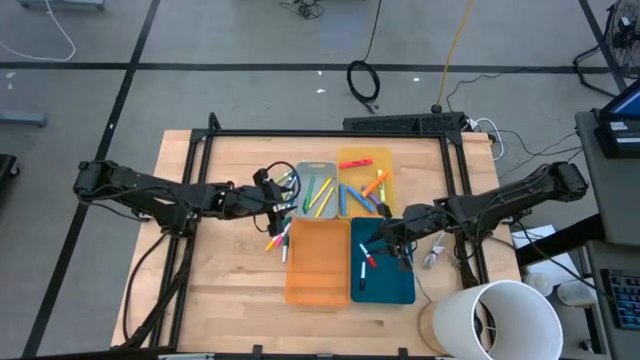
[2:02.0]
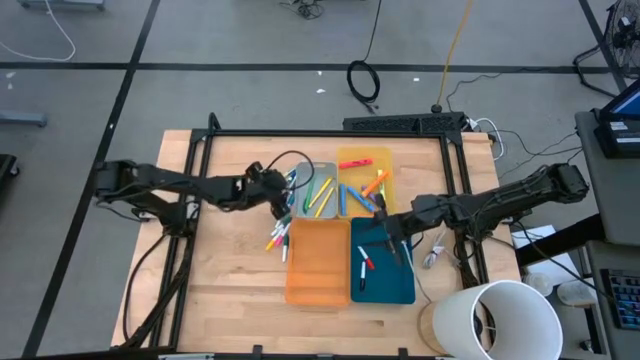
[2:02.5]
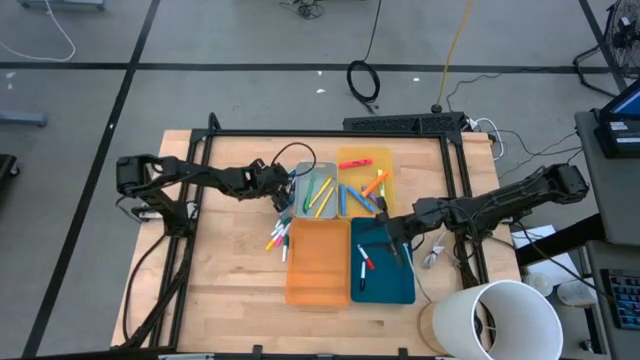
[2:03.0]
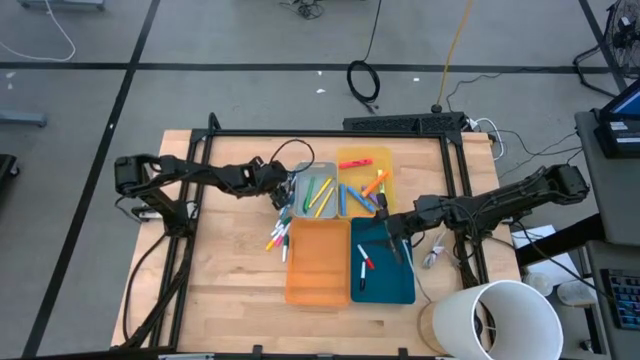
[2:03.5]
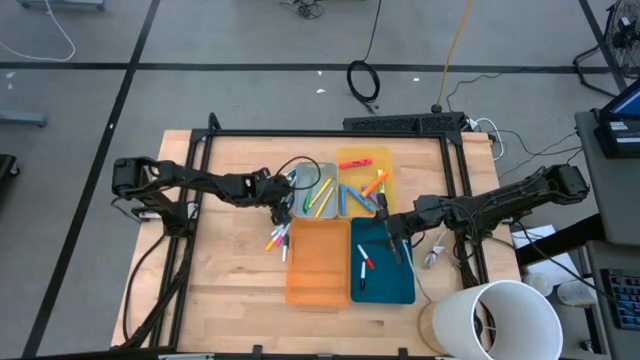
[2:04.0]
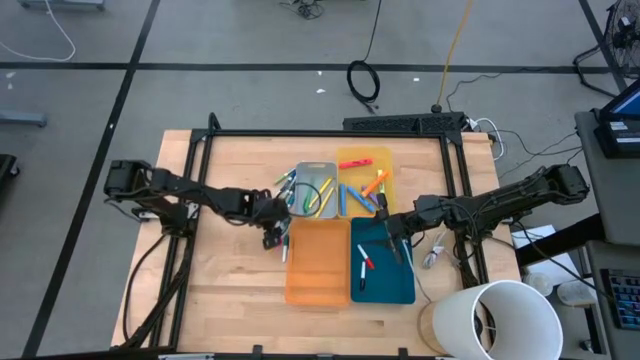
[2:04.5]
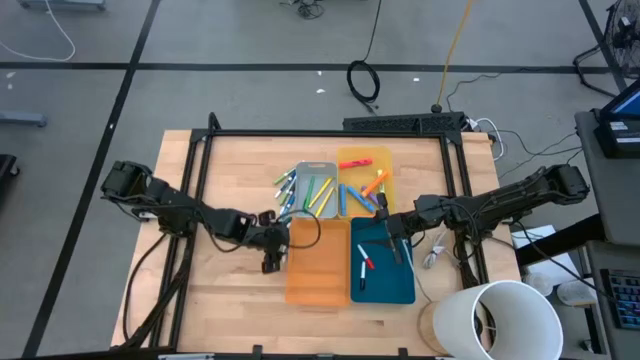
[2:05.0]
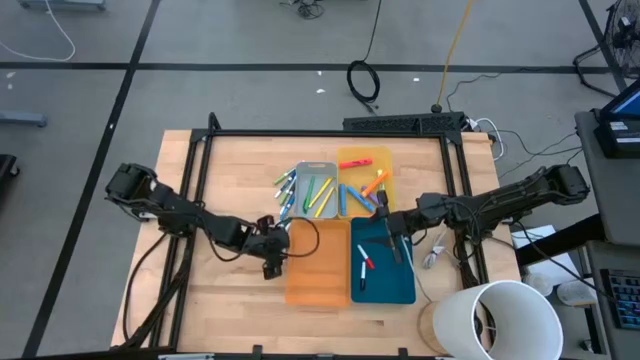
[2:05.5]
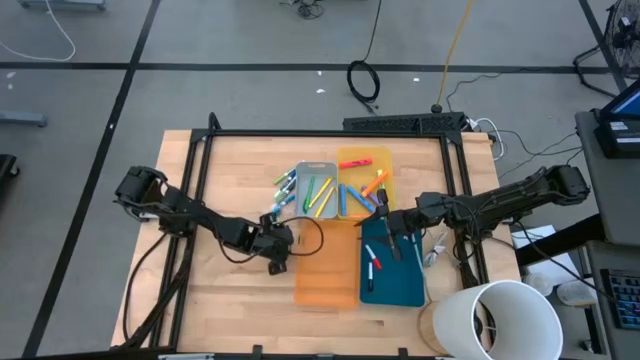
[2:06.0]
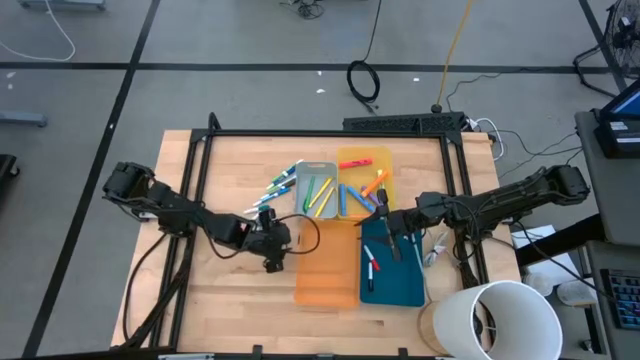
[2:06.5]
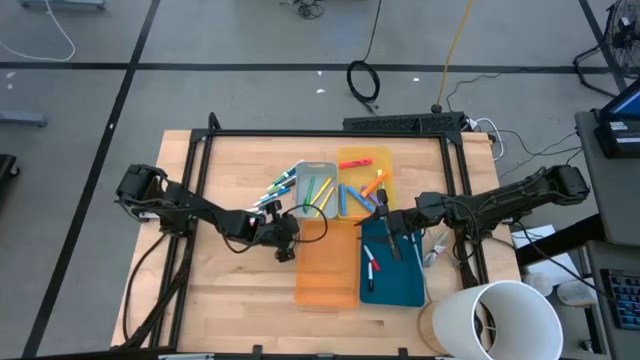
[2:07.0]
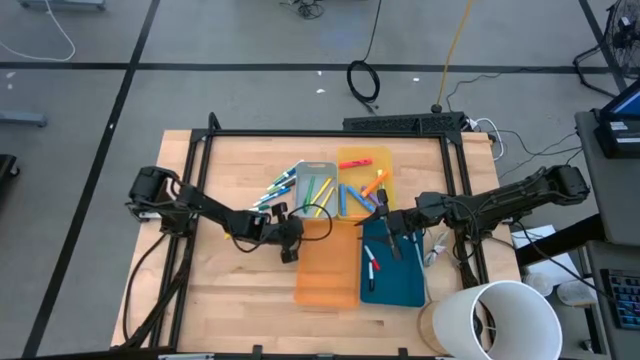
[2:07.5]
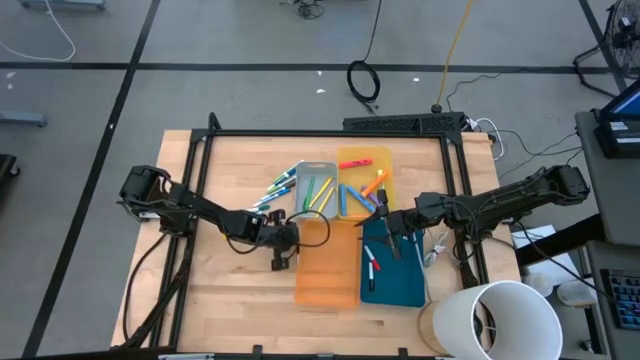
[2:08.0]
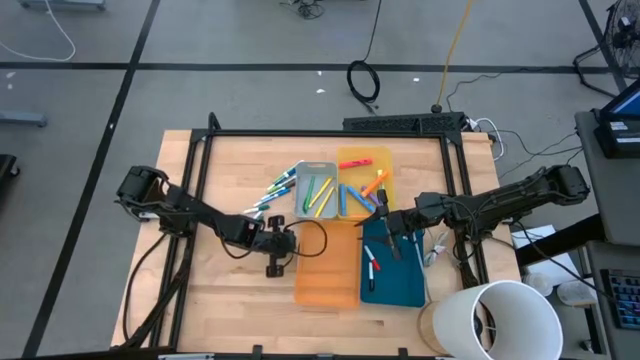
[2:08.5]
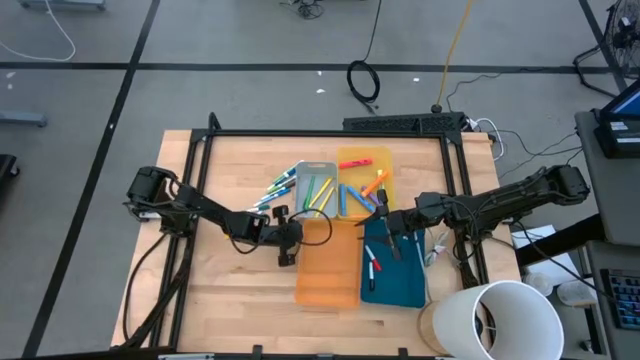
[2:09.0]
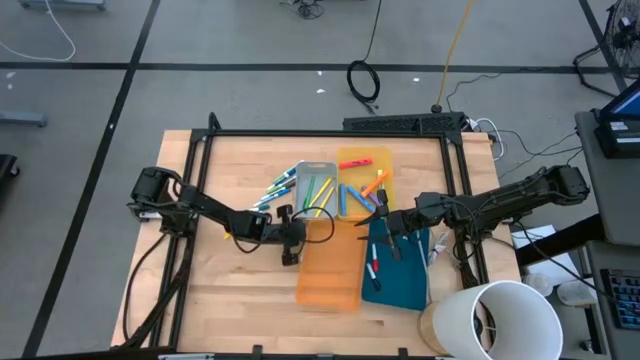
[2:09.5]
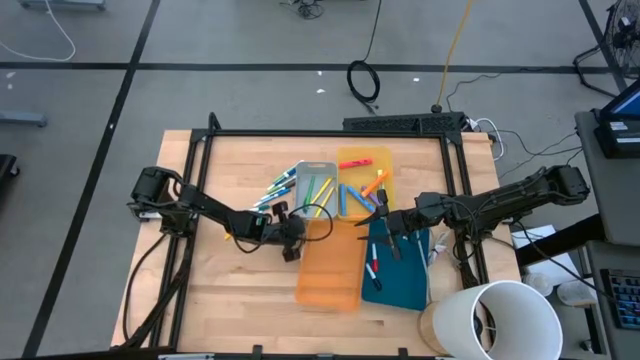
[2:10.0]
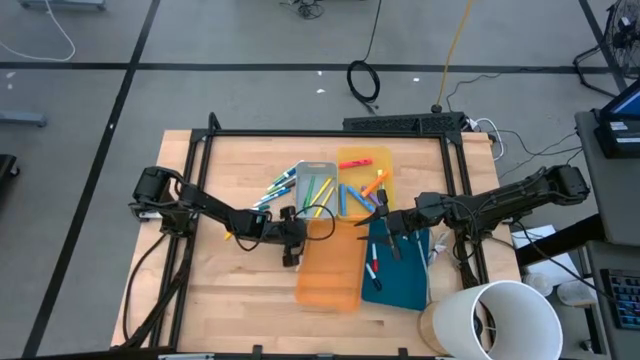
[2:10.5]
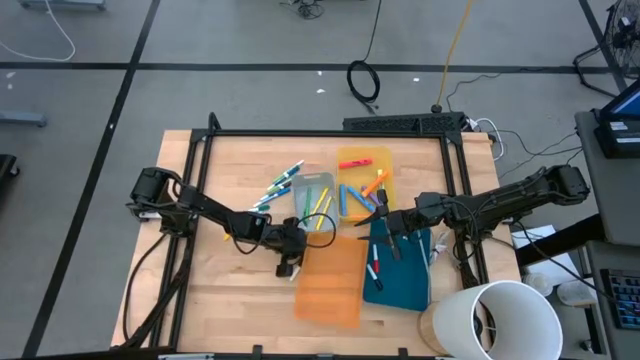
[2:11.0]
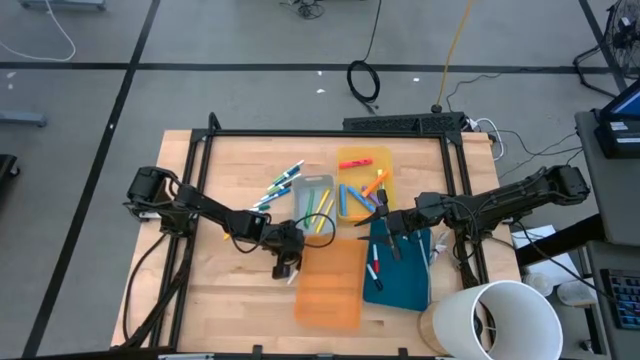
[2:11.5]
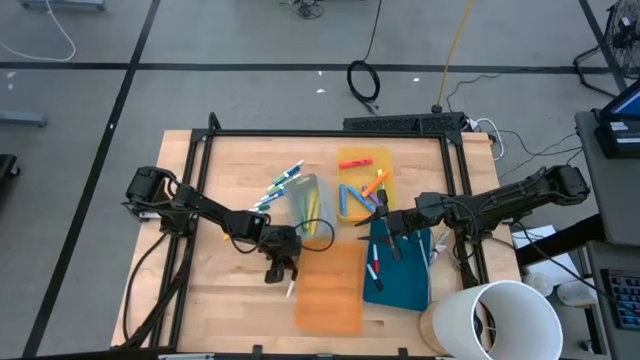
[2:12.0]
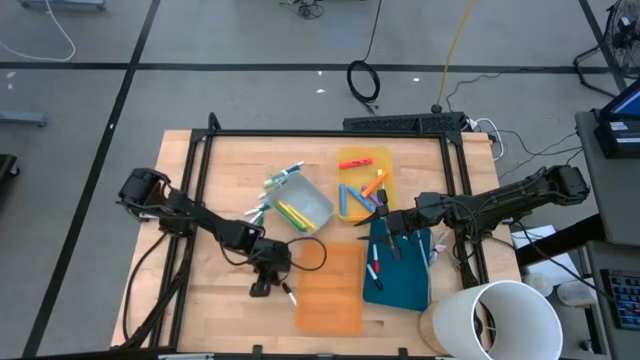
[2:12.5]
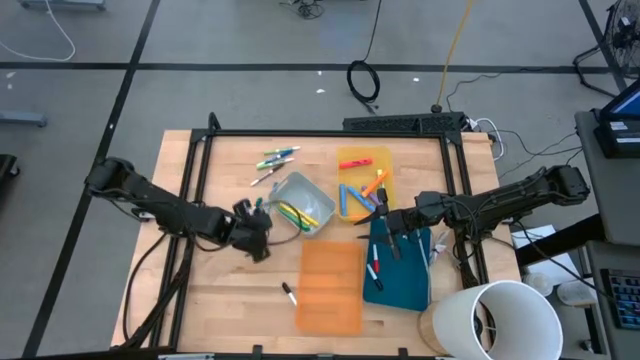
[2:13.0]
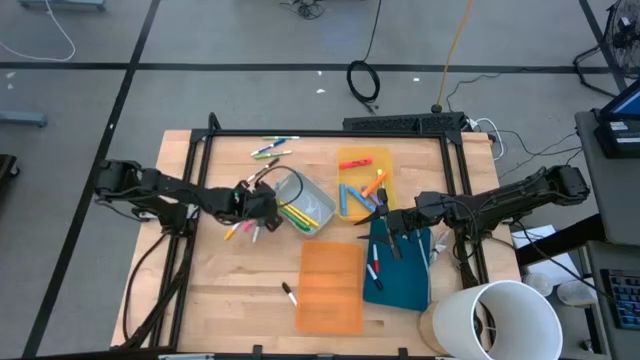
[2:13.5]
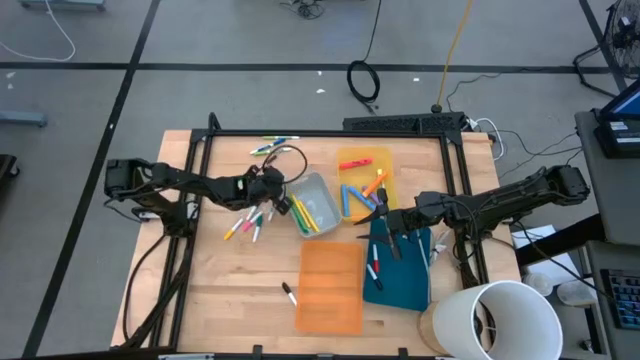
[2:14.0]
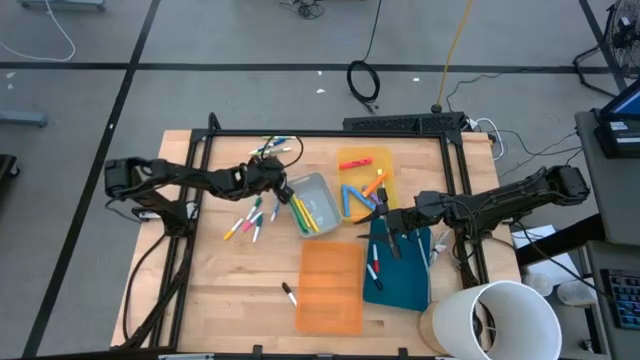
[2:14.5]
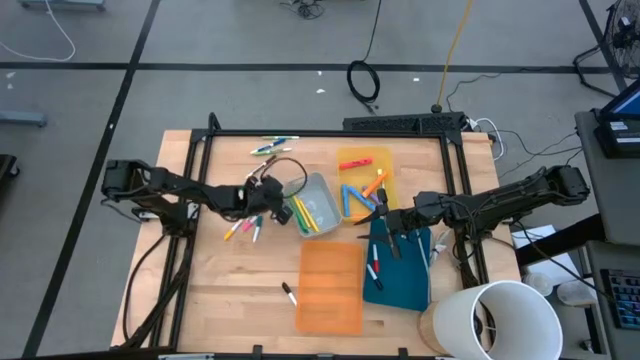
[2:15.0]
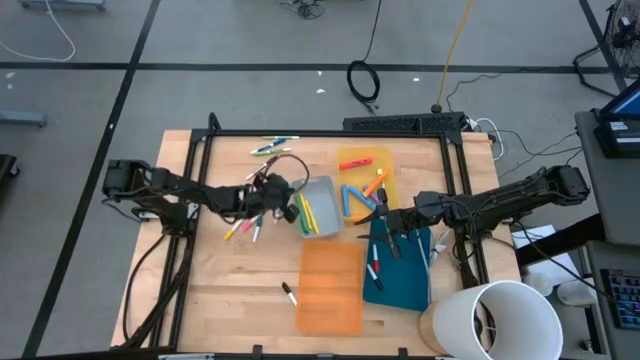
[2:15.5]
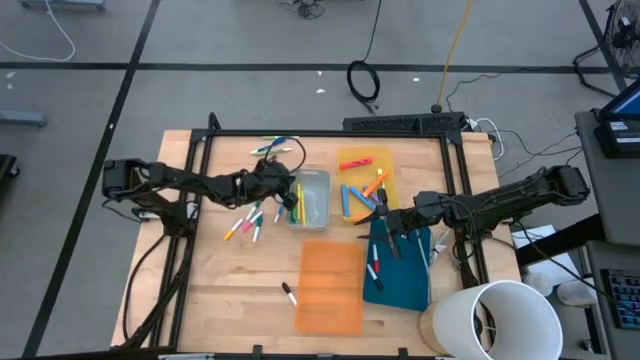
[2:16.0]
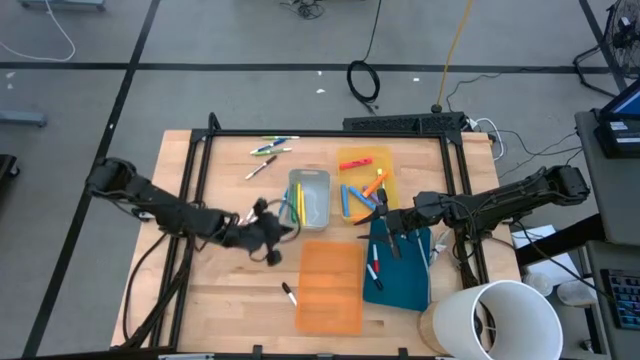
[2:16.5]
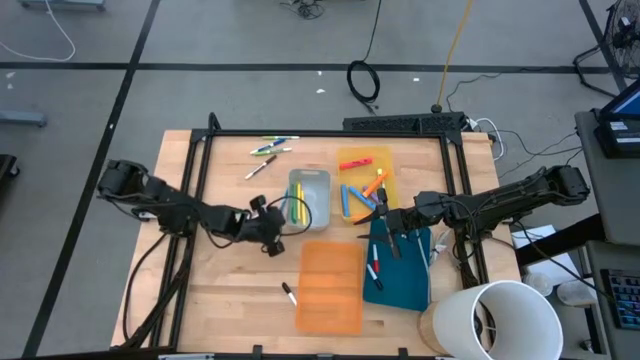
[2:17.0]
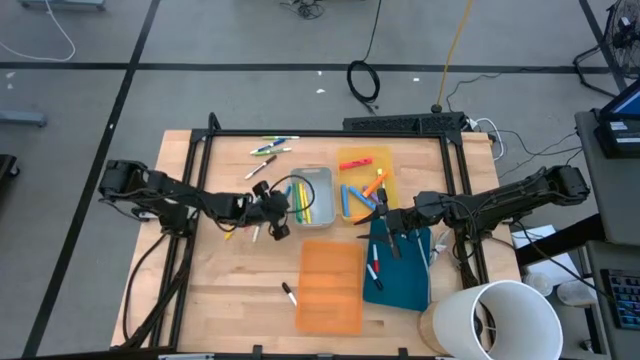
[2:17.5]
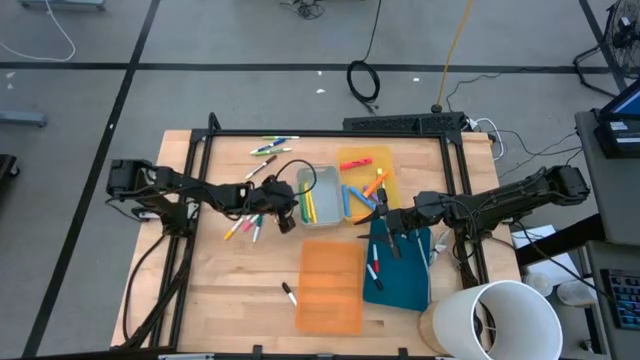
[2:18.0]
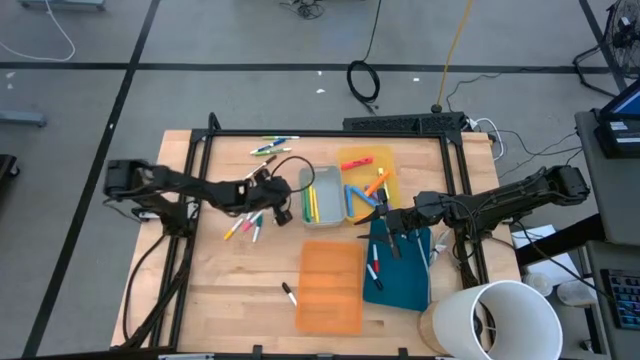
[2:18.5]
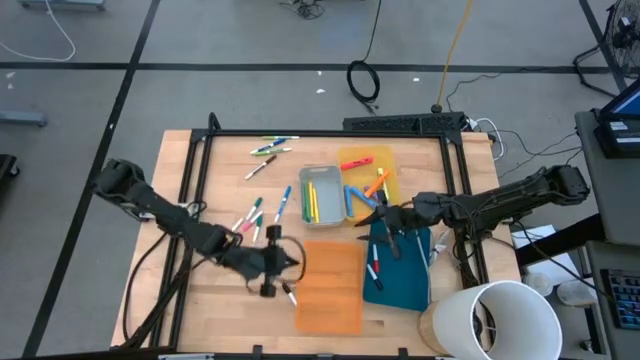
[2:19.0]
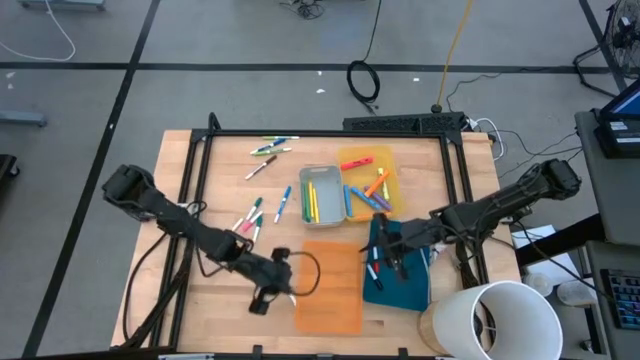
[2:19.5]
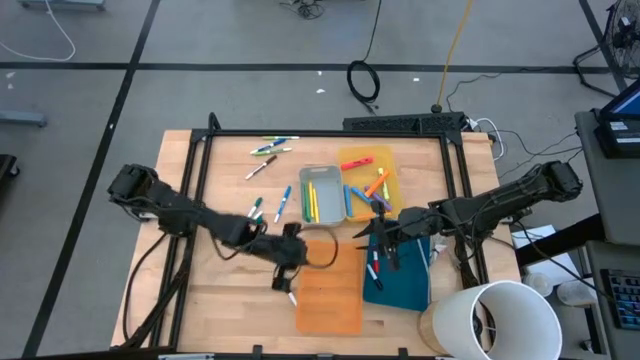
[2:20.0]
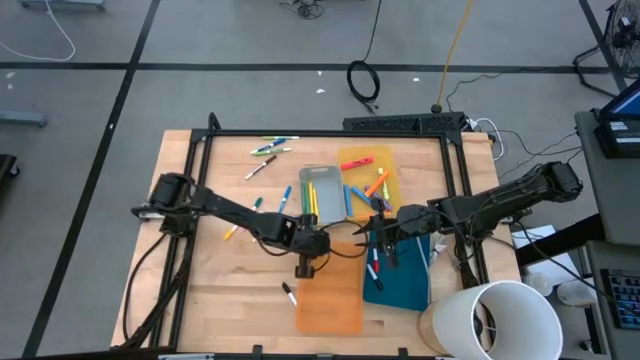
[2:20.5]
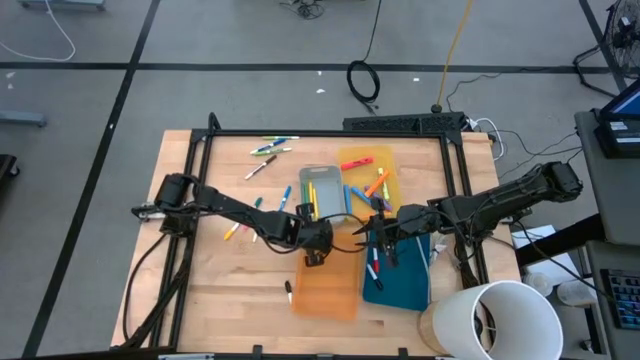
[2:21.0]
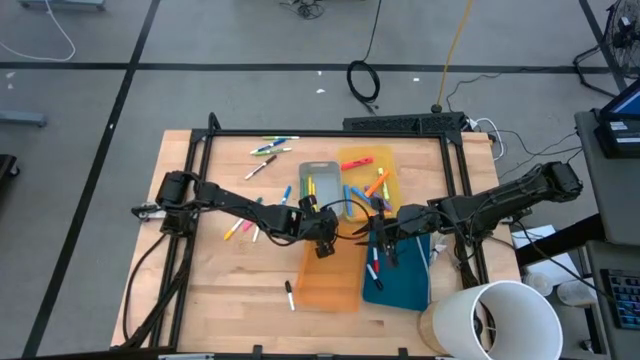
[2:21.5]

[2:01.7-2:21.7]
Task: Pick & Place Markers
Adjust the bins

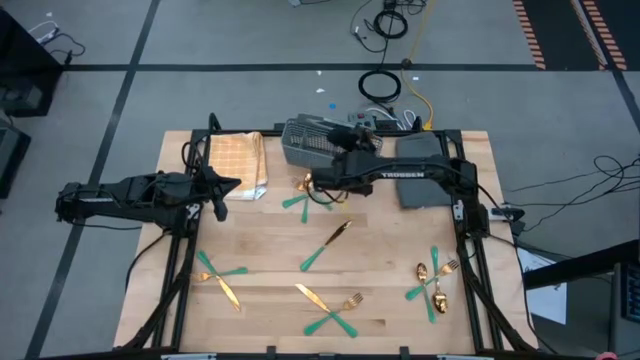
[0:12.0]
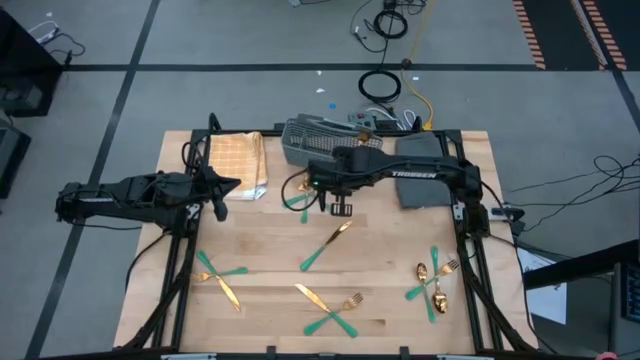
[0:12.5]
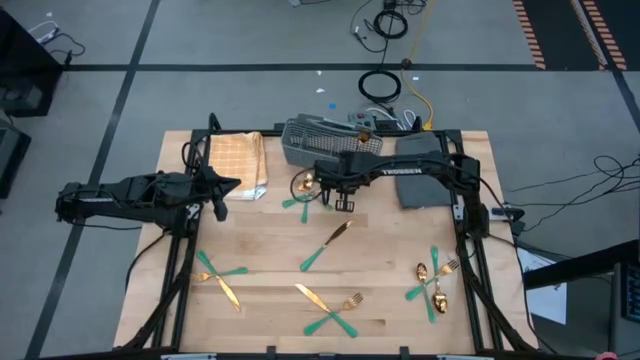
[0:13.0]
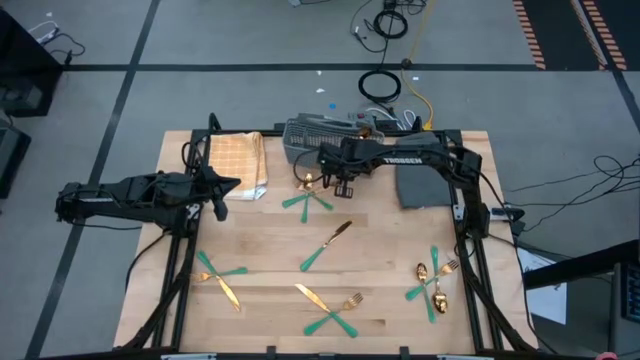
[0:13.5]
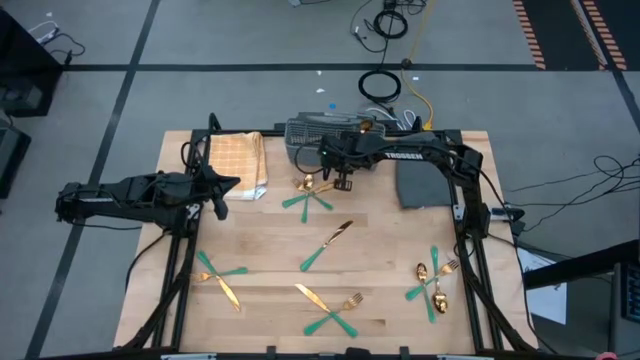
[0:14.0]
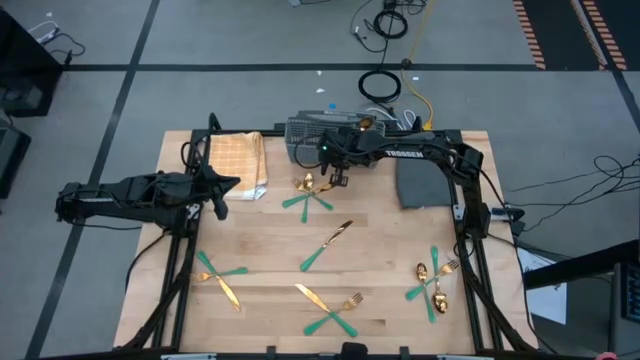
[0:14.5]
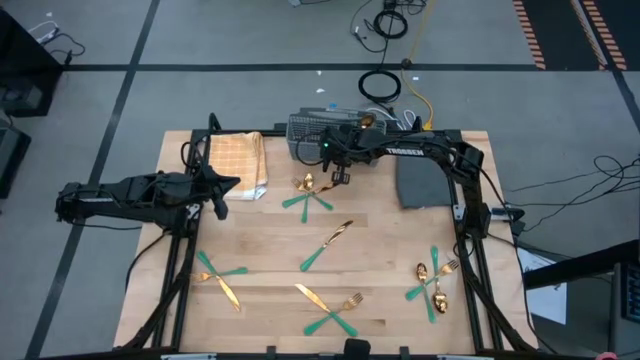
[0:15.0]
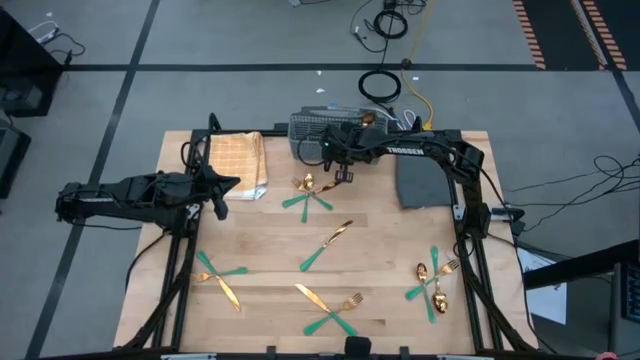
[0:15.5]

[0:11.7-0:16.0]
Task: Sort silverware
Adjust the dish rack
